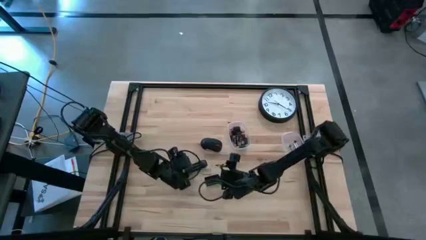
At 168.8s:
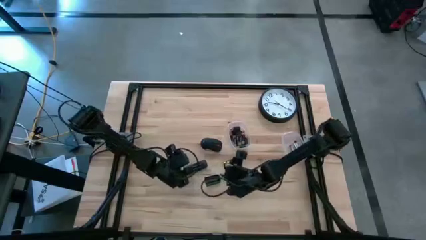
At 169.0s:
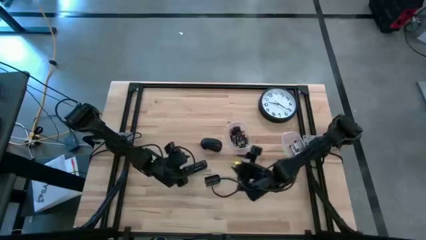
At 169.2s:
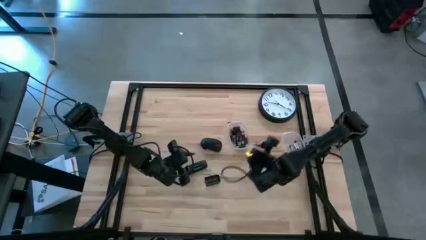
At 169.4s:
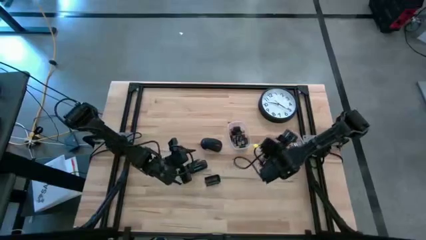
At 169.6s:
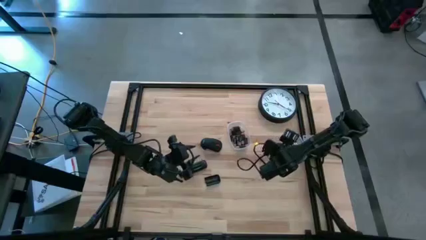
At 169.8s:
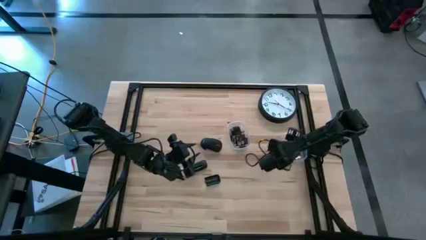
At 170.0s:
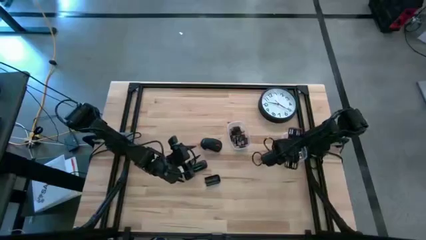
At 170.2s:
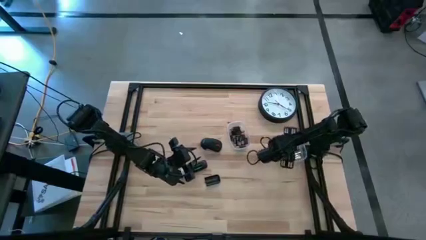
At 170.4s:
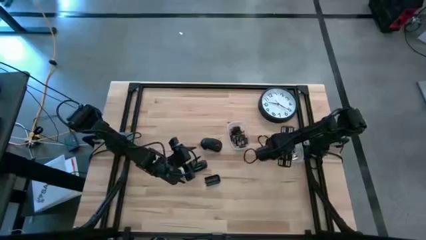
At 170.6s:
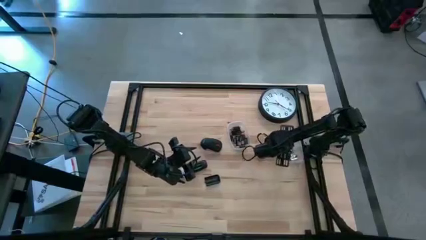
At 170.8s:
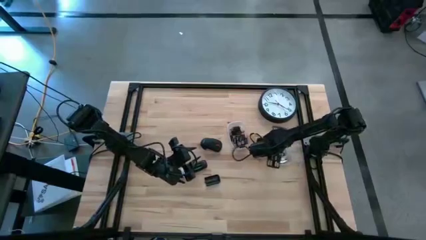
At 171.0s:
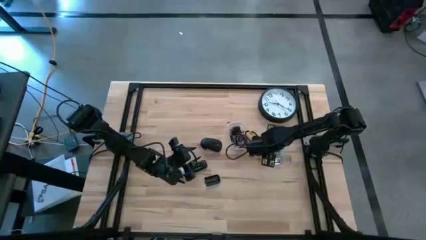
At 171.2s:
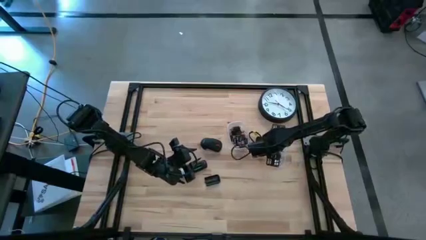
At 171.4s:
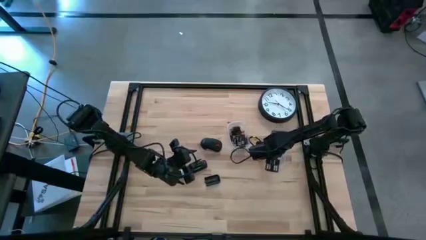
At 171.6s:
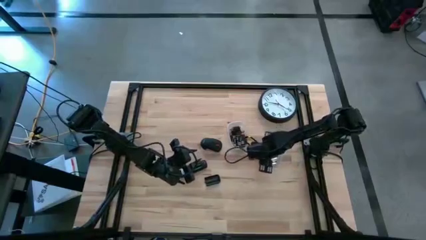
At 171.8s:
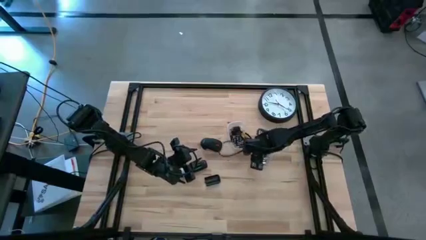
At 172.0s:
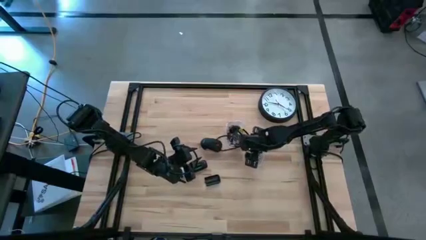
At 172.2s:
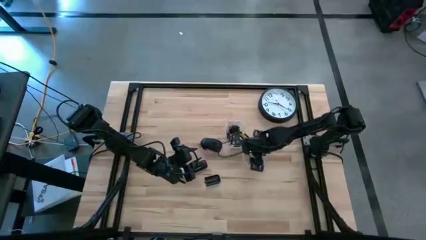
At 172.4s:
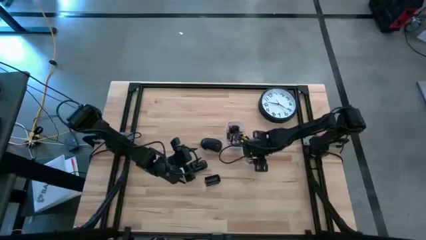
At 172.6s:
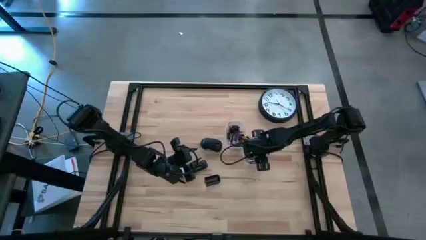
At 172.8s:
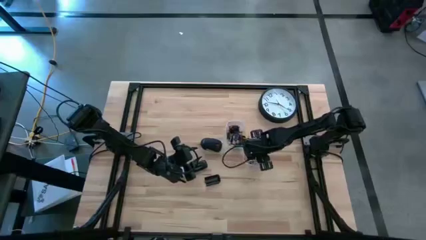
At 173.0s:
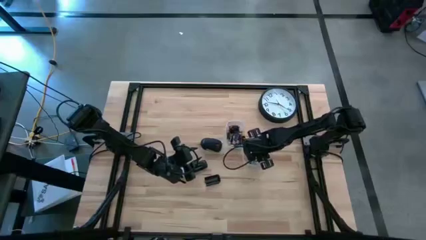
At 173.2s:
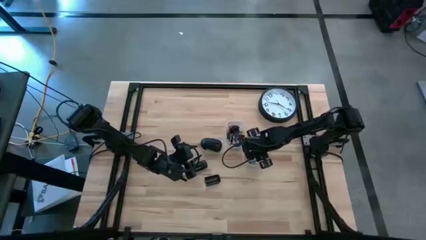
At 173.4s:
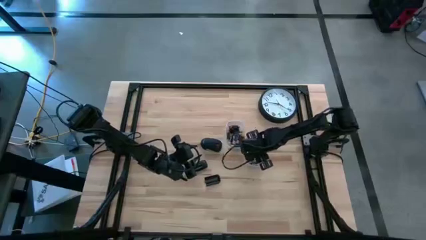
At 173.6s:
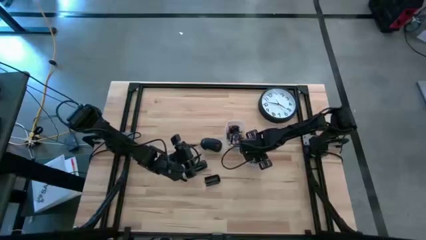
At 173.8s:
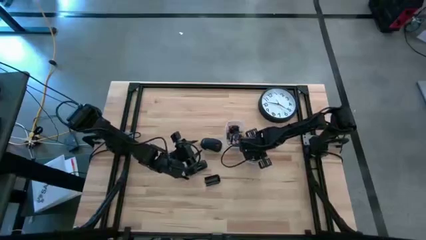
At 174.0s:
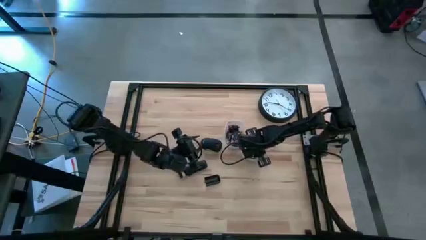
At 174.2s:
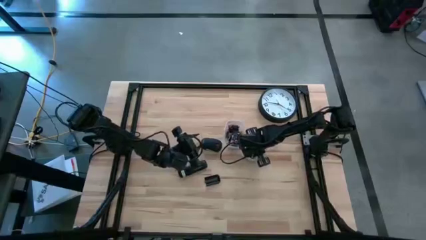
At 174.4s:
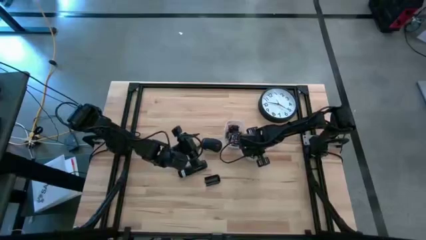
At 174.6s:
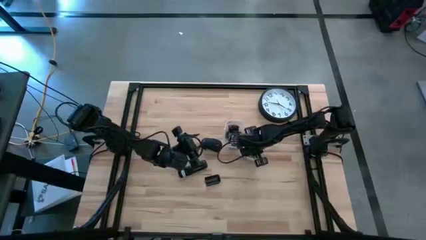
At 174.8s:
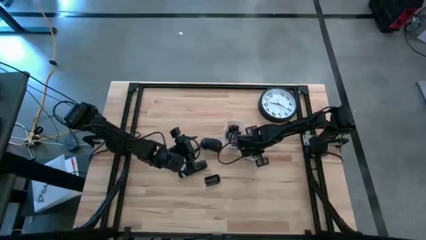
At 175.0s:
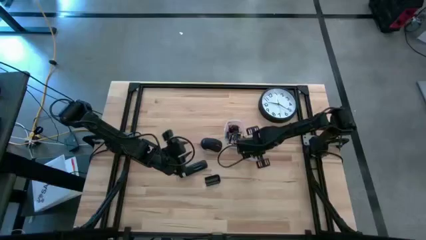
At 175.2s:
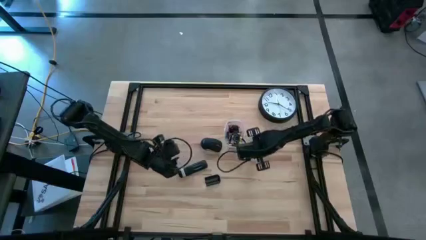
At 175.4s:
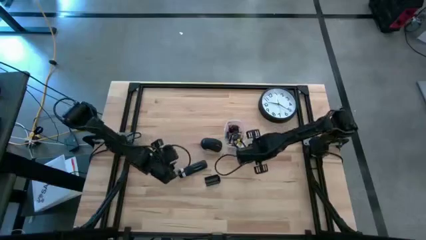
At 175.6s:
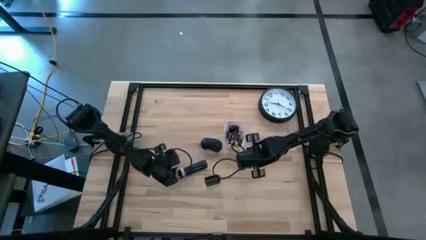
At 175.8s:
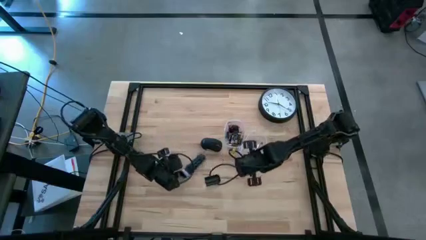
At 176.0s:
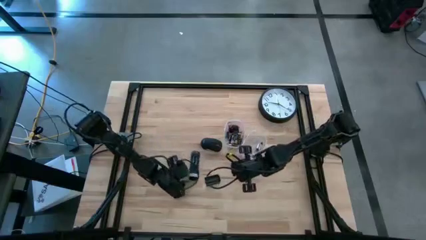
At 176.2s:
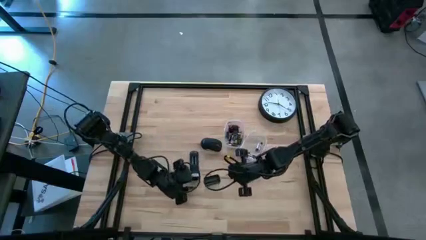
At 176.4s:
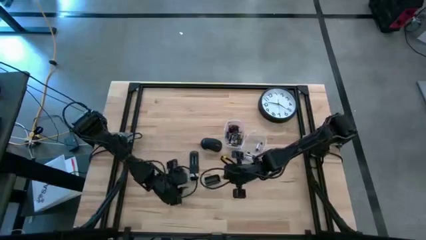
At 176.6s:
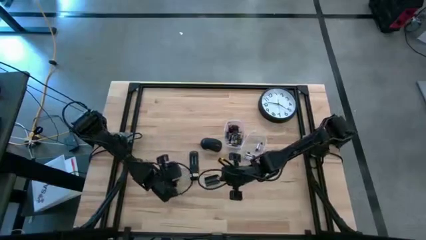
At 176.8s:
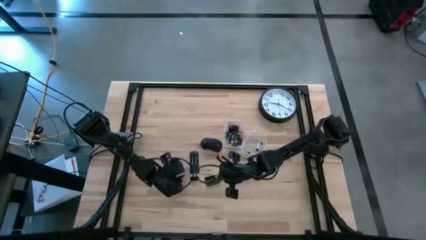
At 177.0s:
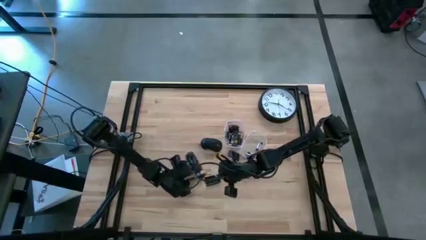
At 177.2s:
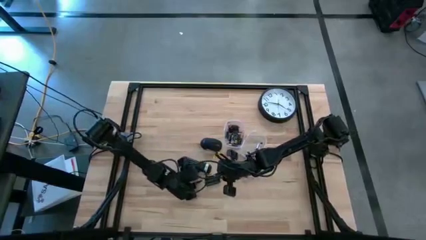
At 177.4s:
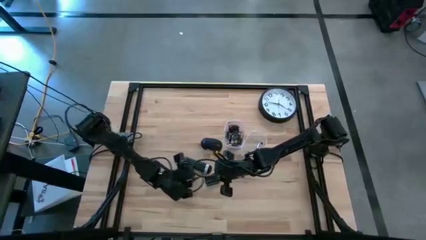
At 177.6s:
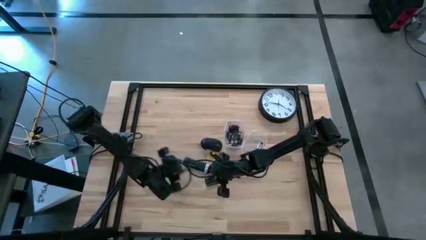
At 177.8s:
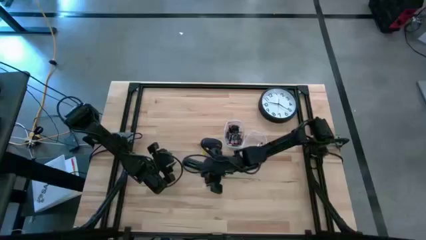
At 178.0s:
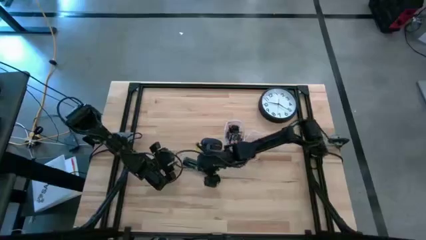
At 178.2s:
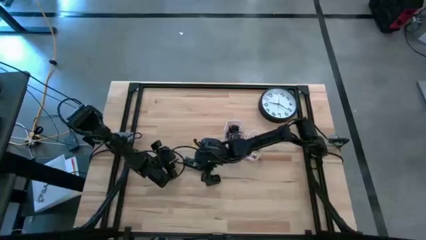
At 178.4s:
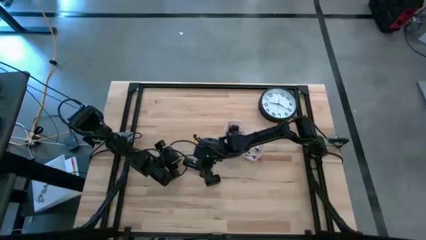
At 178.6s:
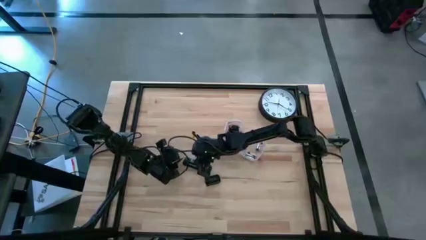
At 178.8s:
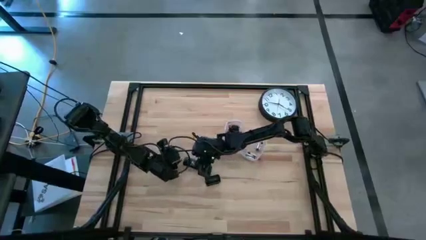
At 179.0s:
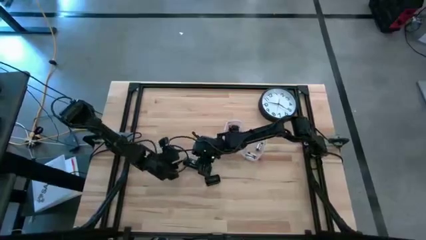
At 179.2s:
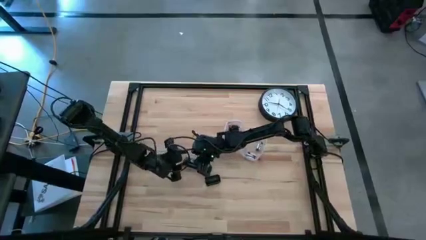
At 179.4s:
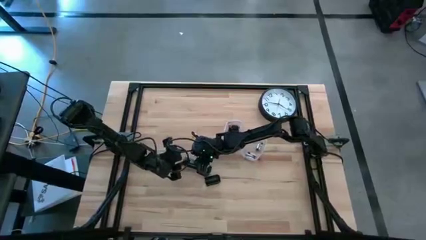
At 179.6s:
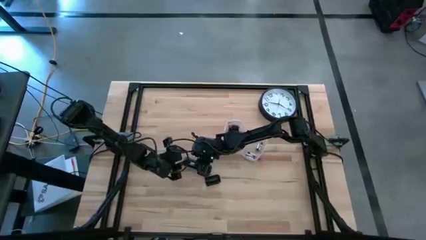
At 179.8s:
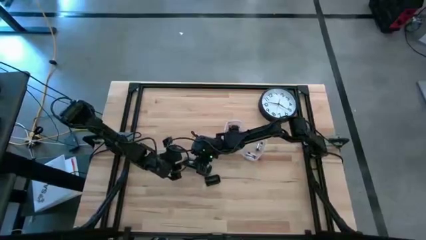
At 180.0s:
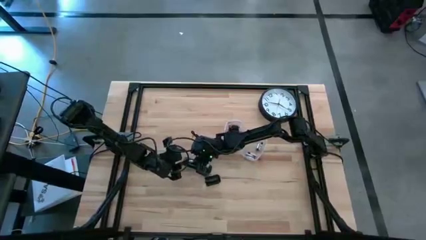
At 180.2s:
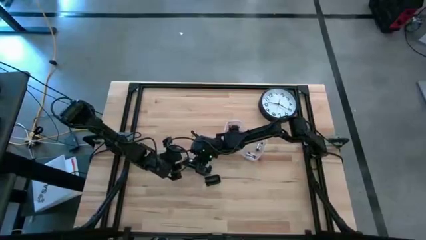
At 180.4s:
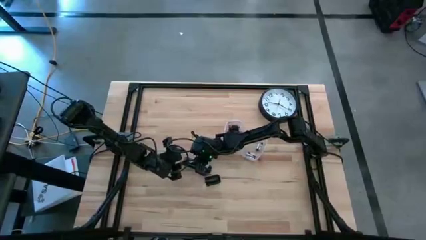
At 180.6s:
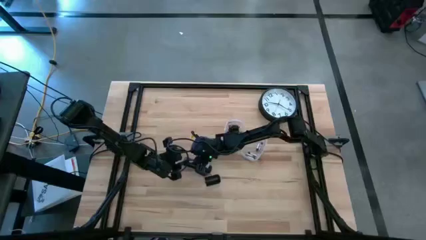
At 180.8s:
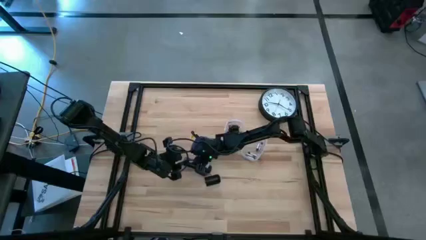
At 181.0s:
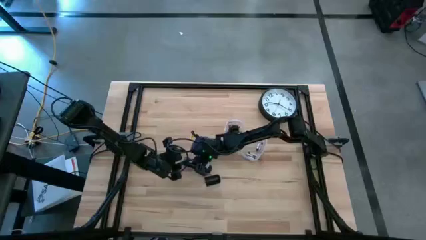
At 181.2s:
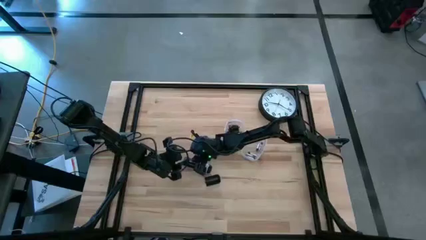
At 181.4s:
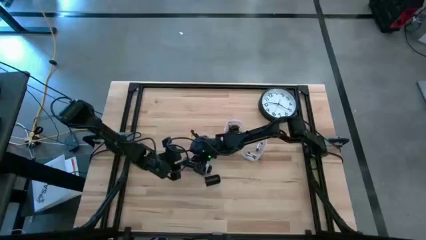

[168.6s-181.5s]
Task: Insert battery
Insert the silver battery into the remote battery compartment

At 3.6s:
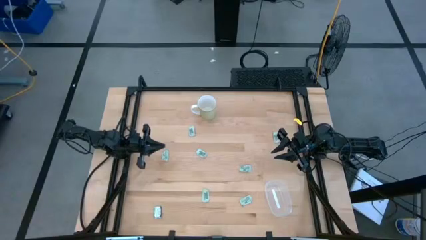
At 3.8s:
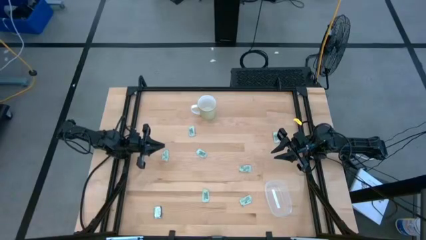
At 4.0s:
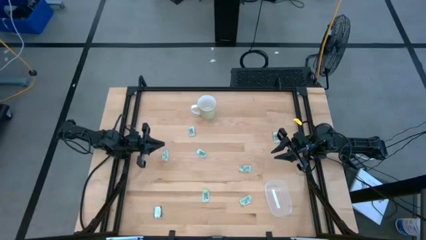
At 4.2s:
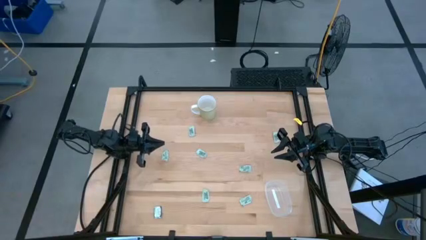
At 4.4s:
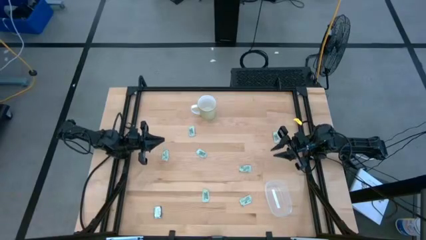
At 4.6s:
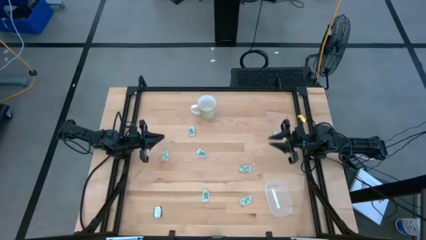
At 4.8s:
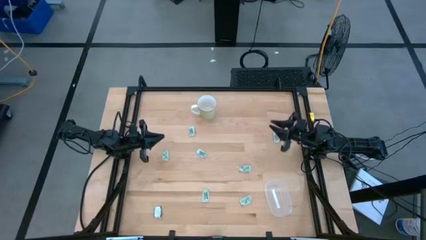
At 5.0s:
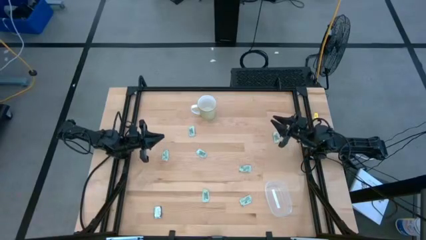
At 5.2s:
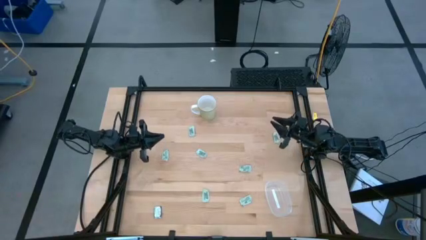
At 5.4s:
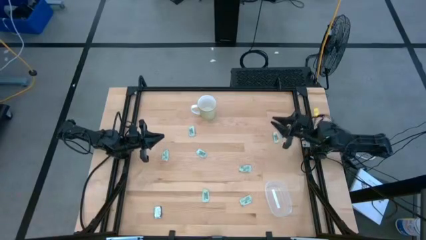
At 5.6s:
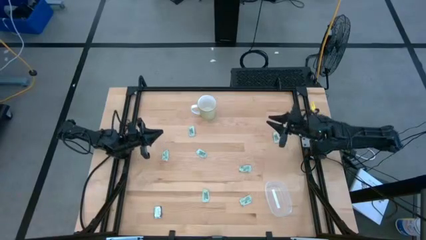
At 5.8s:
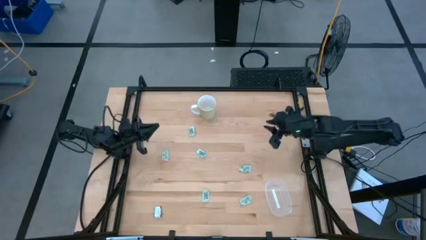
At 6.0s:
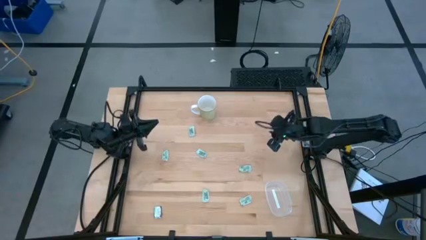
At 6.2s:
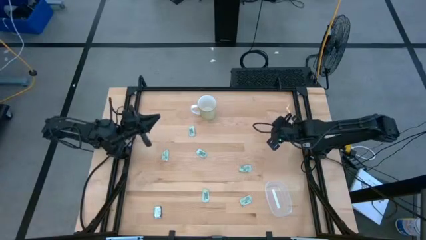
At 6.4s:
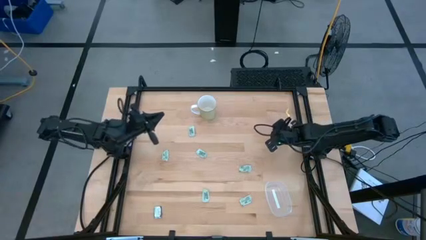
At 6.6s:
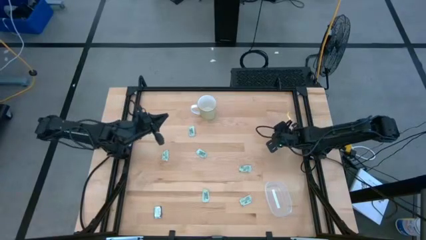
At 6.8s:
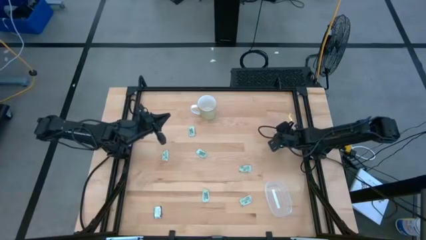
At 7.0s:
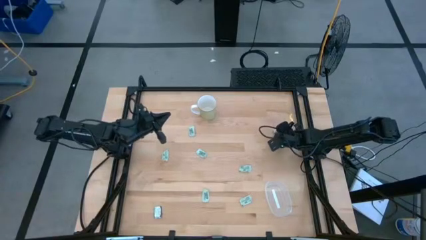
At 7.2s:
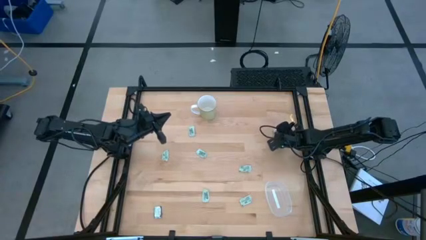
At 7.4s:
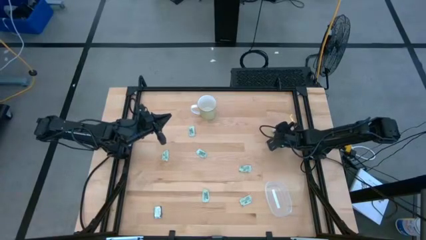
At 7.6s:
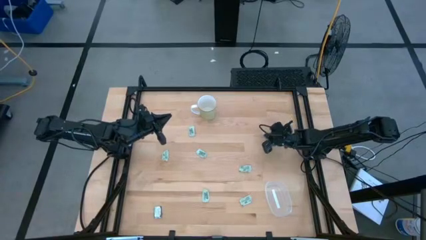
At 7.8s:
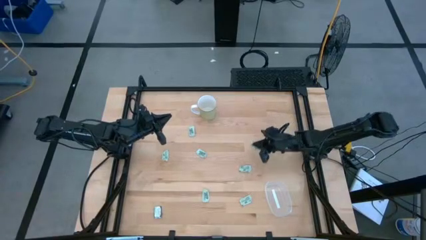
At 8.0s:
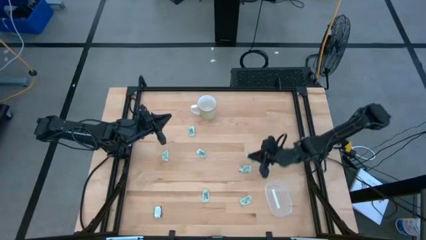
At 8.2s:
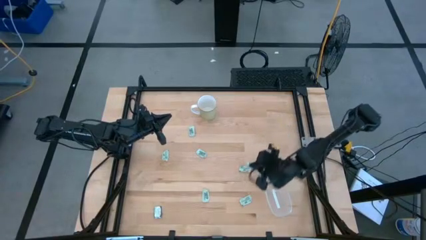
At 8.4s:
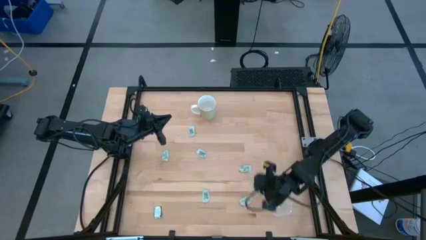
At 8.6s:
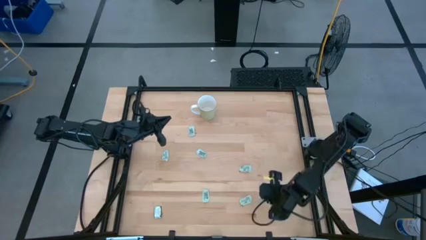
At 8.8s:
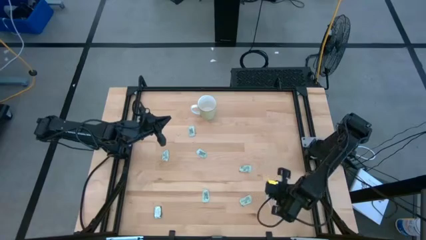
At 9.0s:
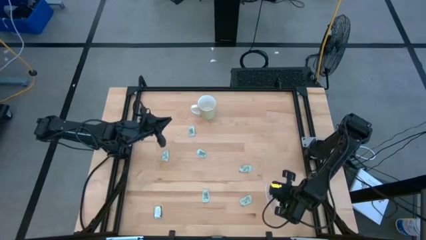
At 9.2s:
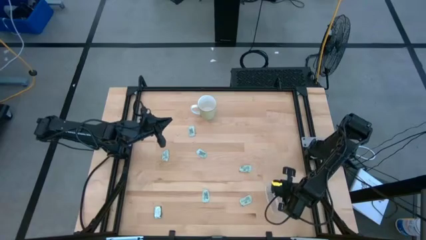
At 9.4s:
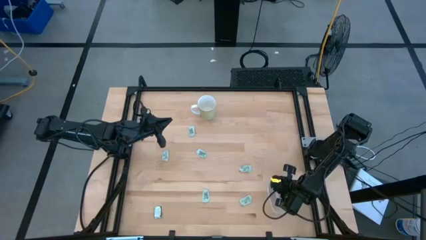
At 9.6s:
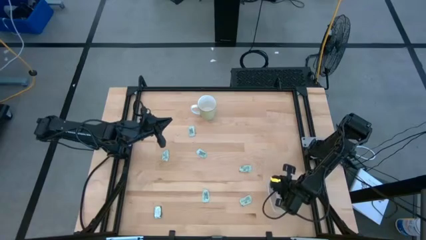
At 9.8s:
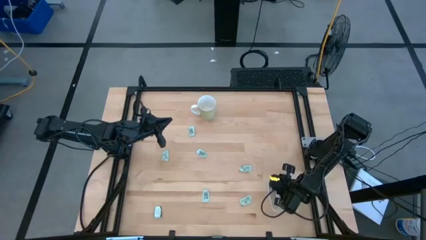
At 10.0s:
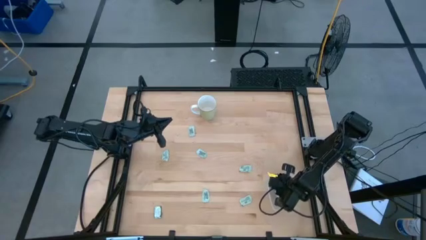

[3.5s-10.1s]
Task: Pick and place Stevia / Truvia into bins
Put the stevia packet into the transparent bin
